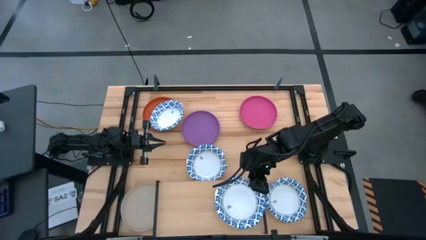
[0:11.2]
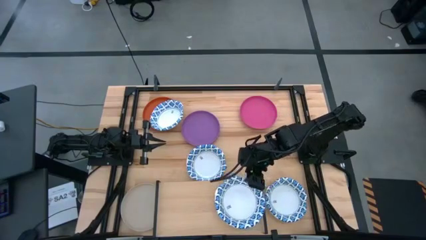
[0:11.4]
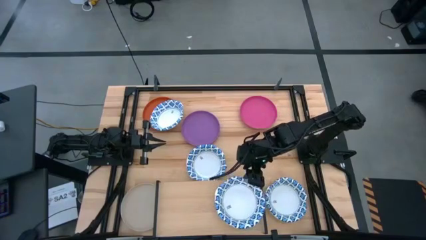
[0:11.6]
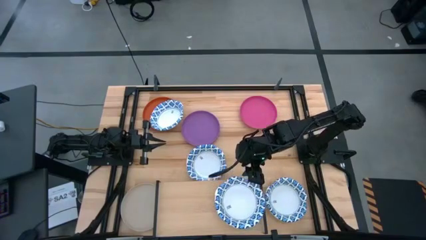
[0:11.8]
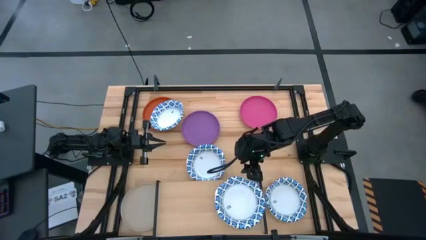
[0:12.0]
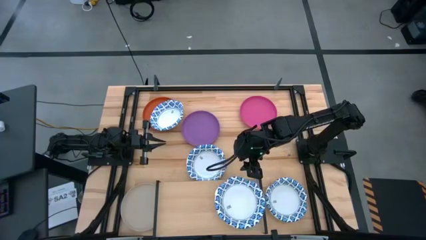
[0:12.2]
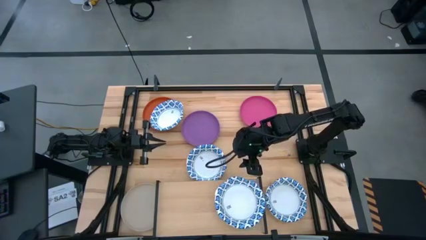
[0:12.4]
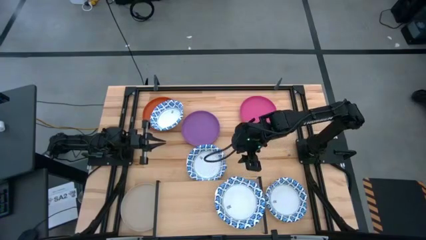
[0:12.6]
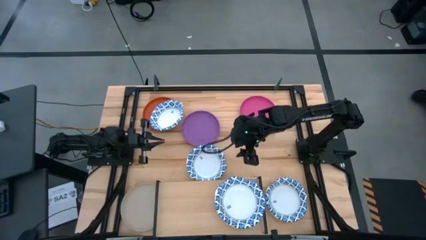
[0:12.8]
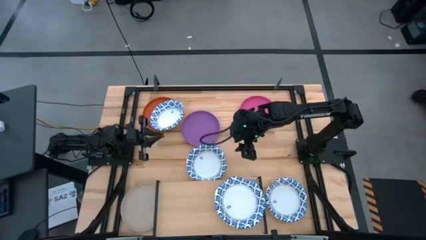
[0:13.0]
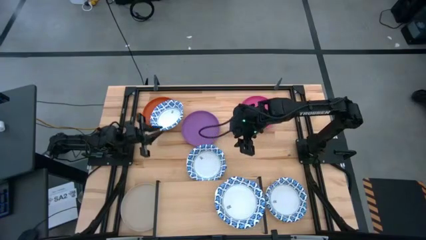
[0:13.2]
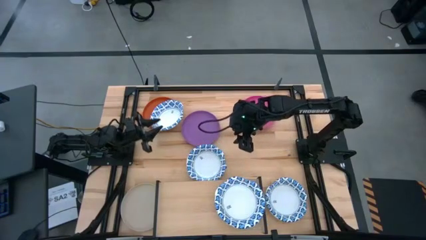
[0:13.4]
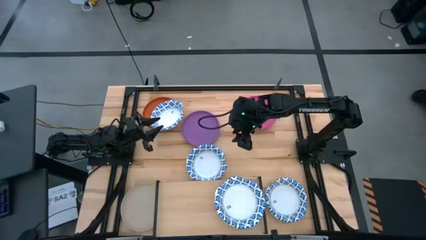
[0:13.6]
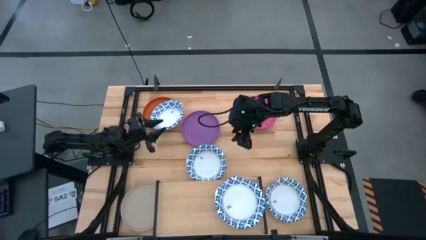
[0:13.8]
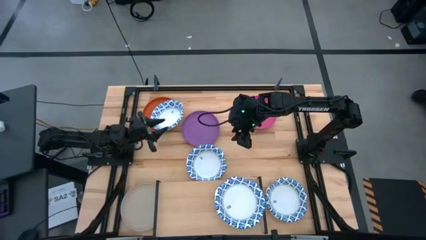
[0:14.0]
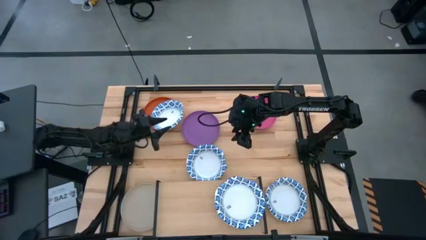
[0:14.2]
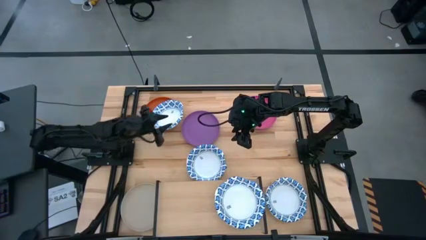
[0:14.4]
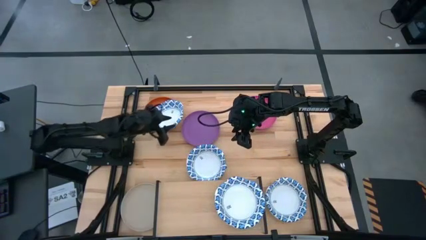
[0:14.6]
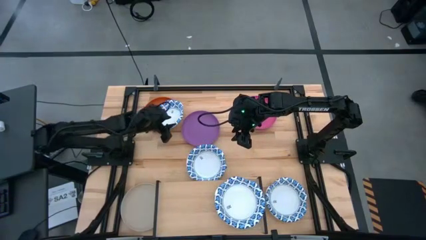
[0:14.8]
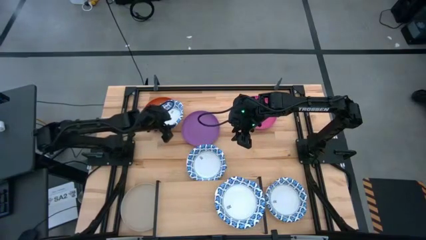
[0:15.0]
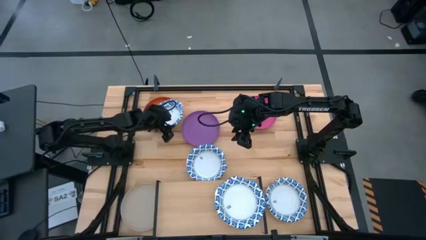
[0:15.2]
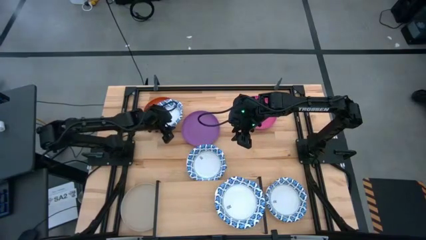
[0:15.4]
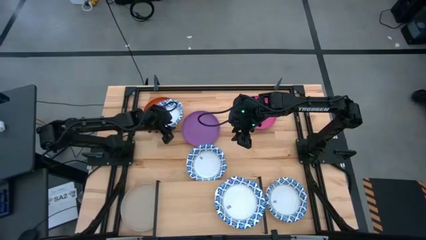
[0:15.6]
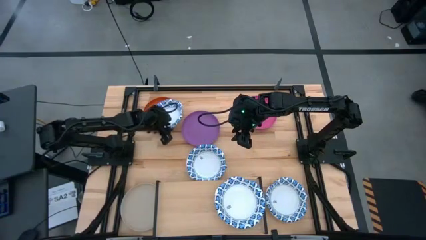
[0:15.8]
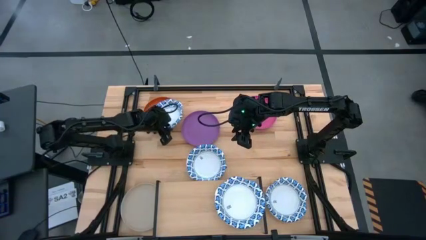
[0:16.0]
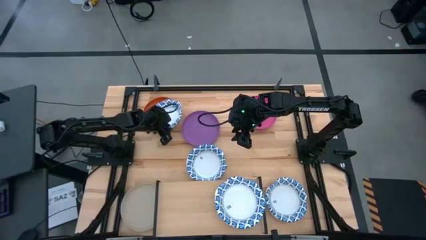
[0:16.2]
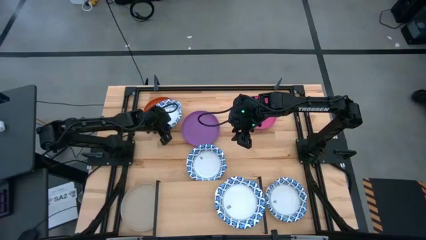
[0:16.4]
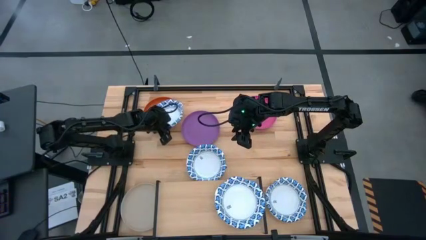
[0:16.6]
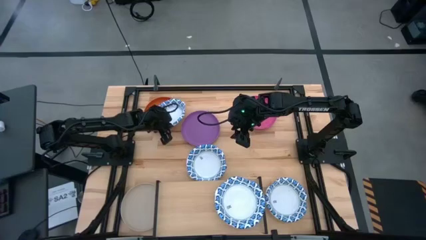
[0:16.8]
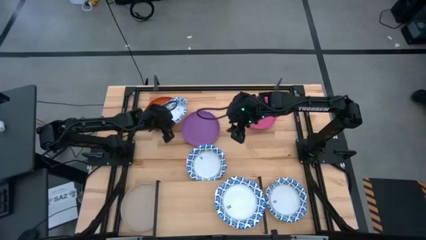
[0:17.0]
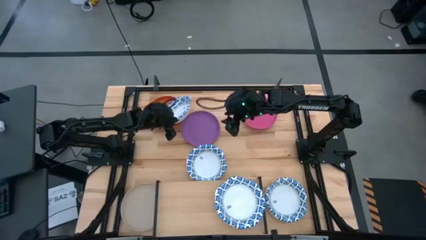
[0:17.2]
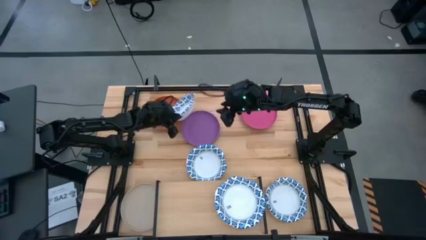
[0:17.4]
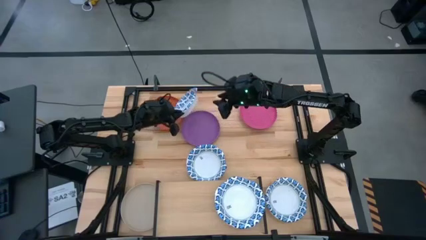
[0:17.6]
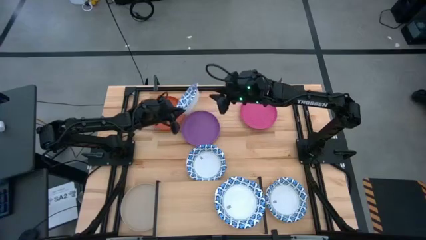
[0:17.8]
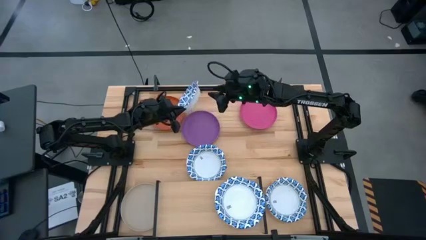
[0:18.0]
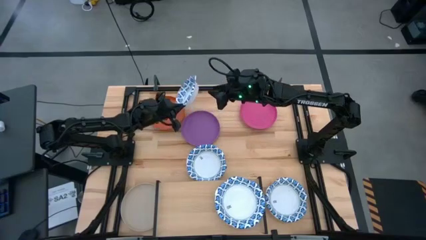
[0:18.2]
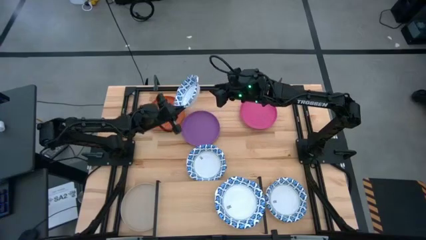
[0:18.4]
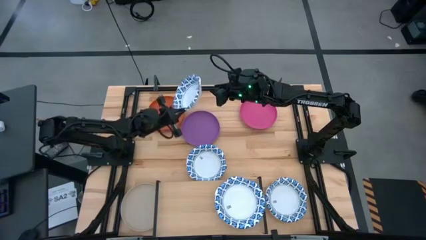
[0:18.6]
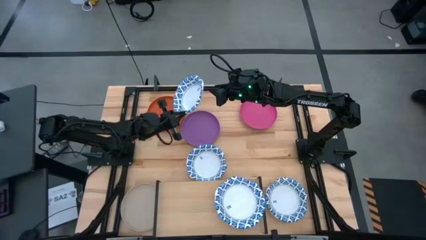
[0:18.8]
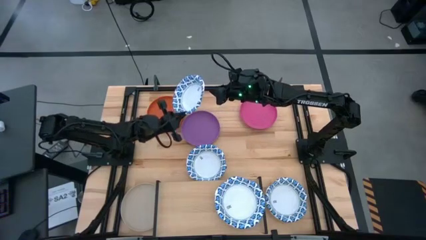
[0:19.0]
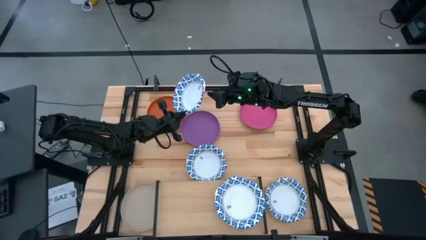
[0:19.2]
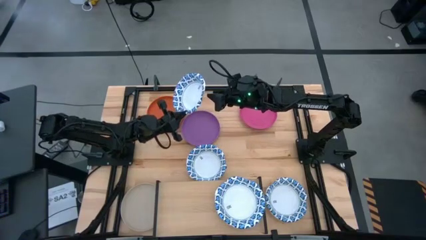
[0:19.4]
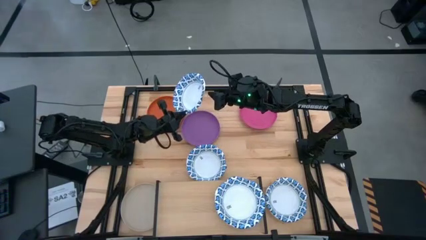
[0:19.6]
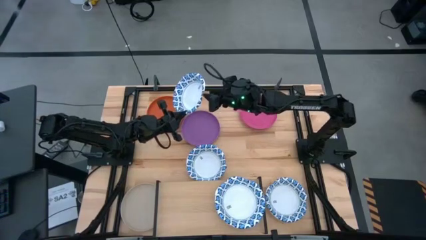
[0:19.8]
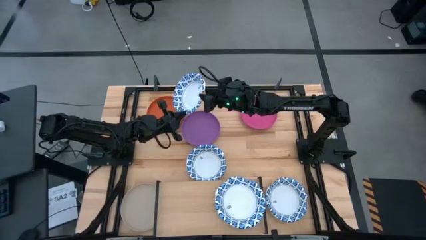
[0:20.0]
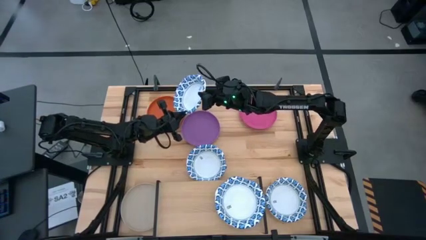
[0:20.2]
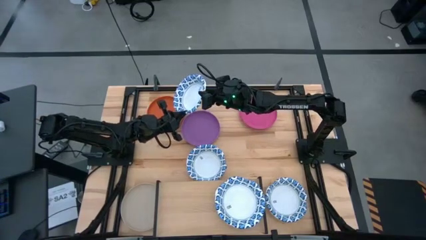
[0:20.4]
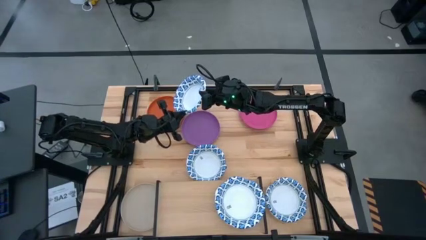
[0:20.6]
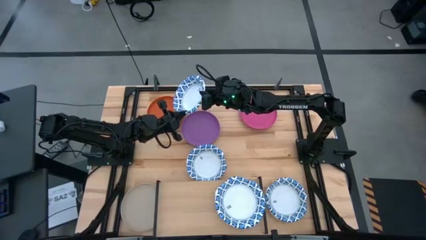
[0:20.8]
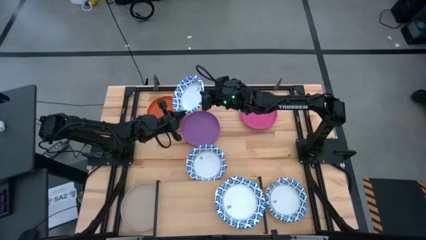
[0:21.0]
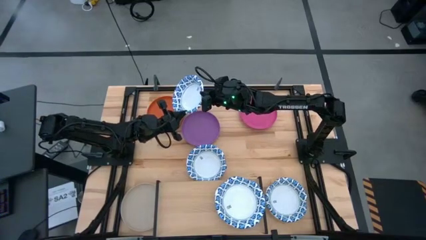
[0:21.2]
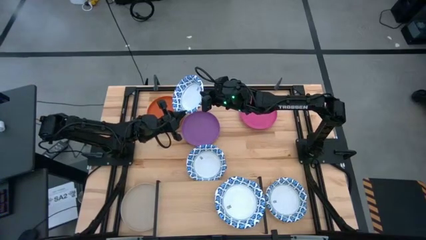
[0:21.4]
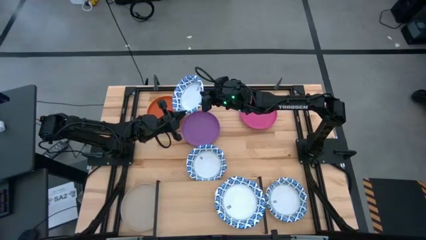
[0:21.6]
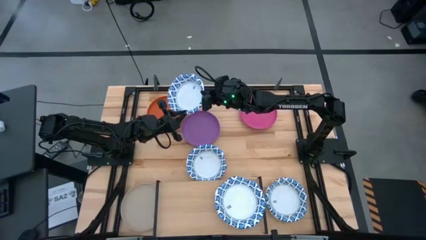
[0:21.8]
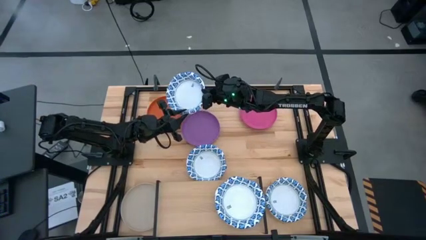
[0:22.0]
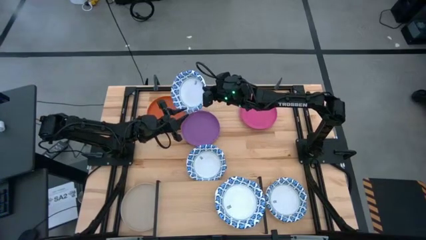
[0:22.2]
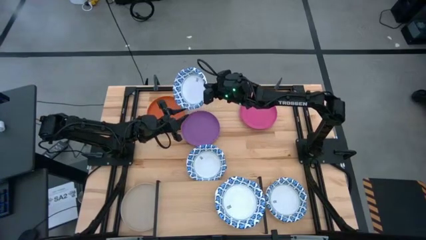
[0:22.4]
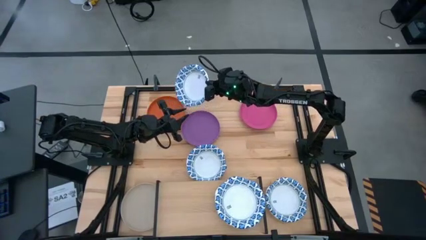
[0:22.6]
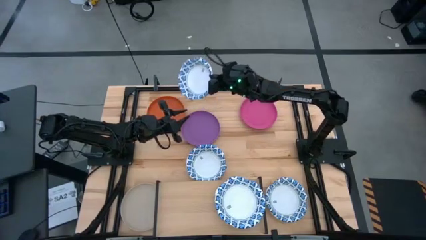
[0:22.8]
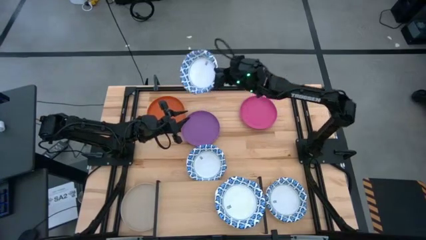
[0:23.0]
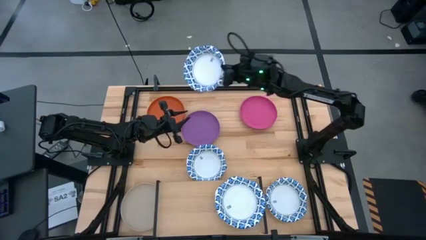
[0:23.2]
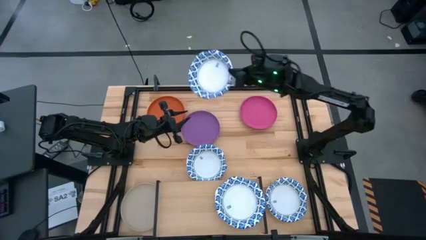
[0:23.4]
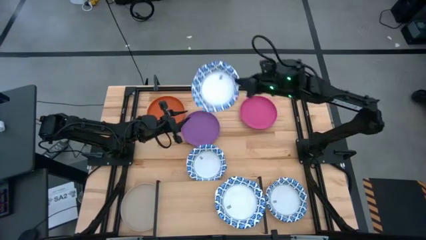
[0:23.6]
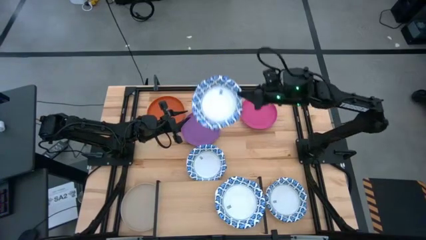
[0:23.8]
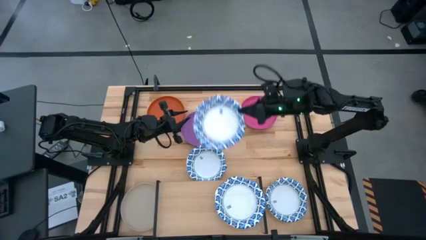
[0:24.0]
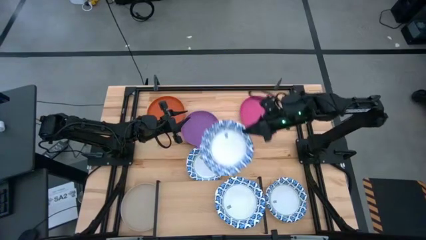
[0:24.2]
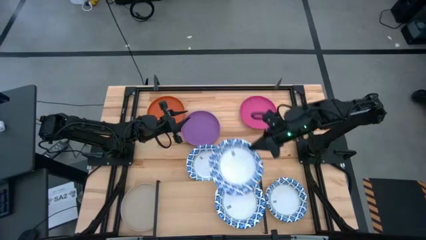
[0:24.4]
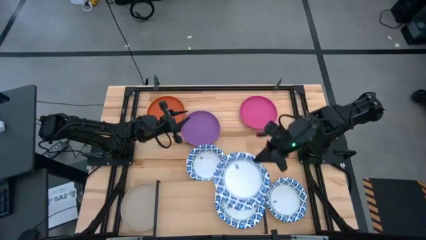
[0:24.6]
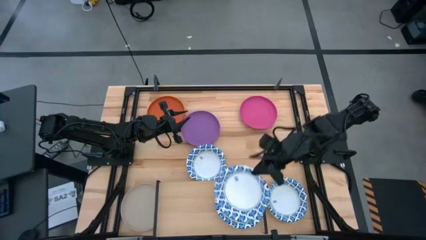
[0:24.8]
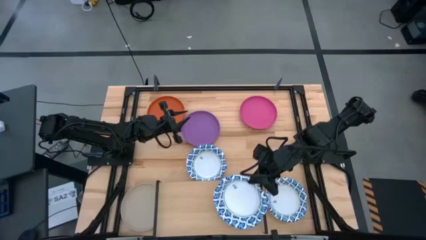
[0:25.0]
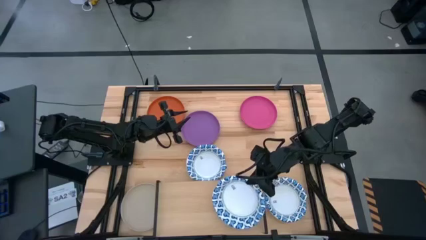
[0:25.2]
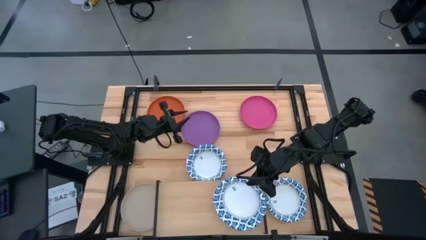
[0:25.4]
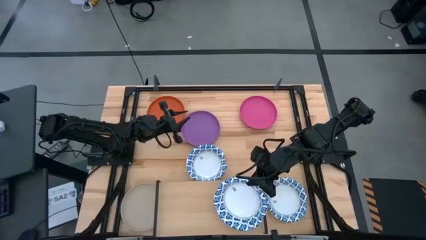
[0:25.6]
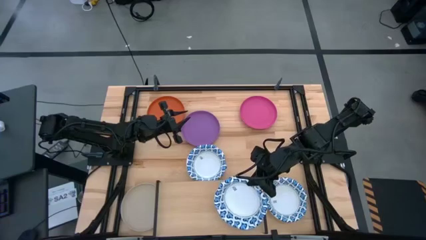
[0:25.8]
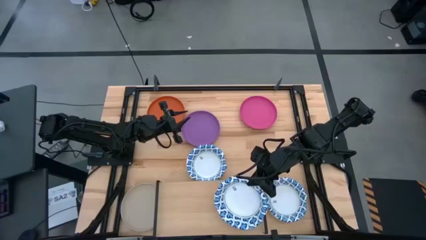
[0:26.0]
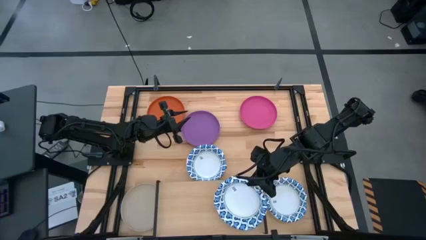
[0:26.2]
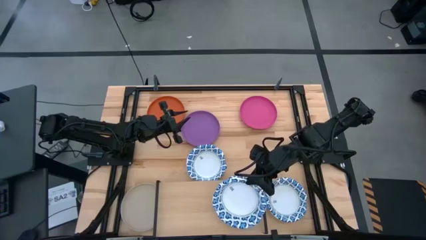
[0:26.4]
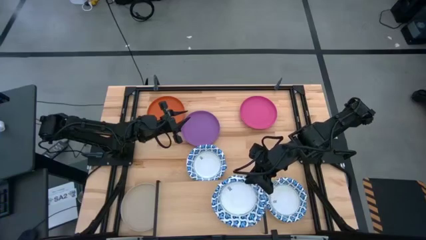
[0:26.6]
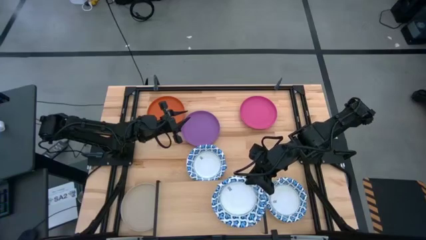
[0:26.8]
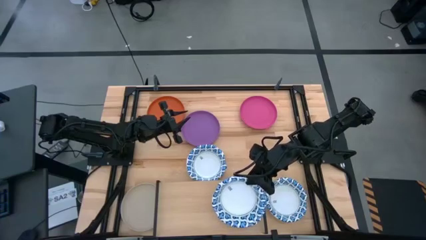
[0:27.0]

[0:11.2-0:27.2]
Task: Place and stack plates onto a shelf
Stack the white bowl on top of the white bowl on the shelf
